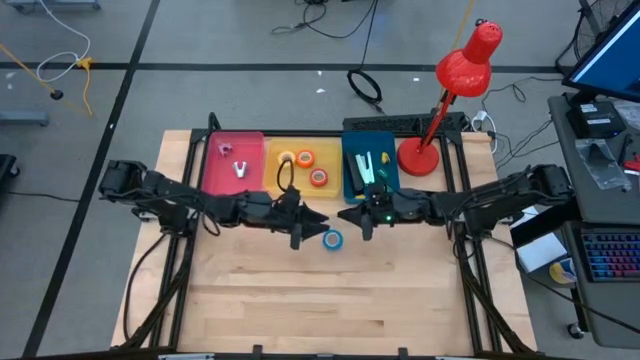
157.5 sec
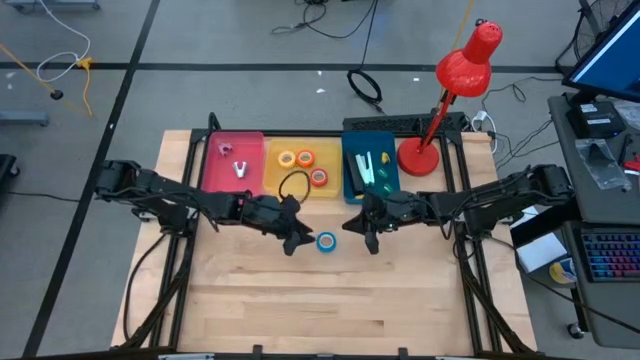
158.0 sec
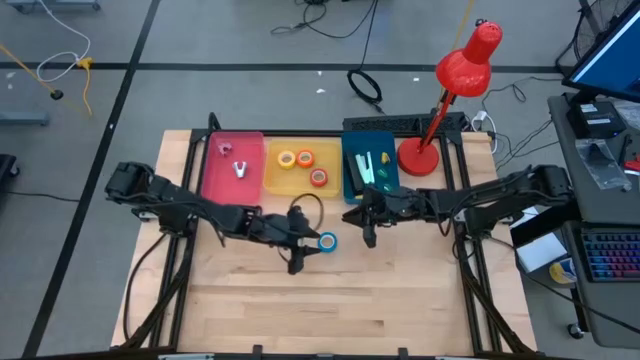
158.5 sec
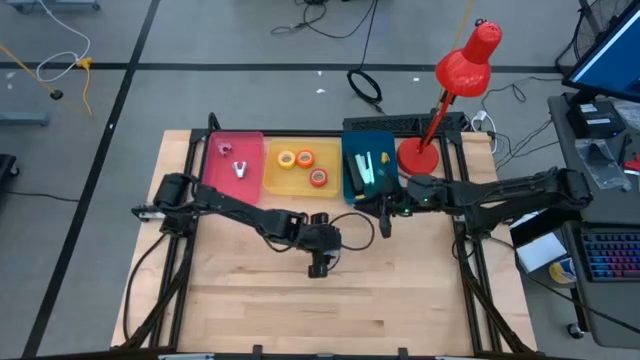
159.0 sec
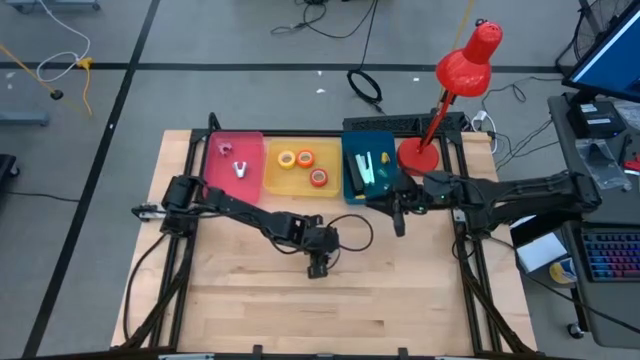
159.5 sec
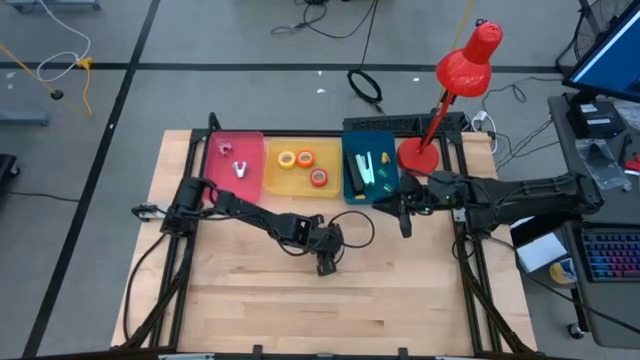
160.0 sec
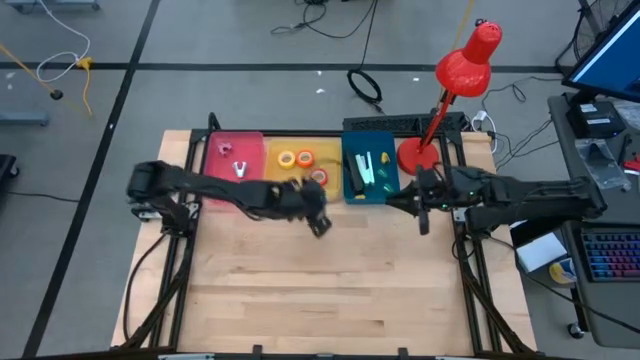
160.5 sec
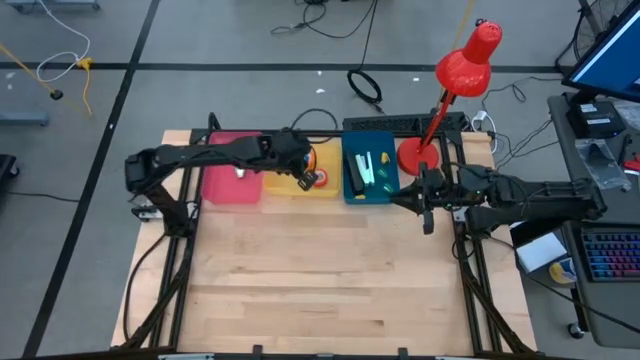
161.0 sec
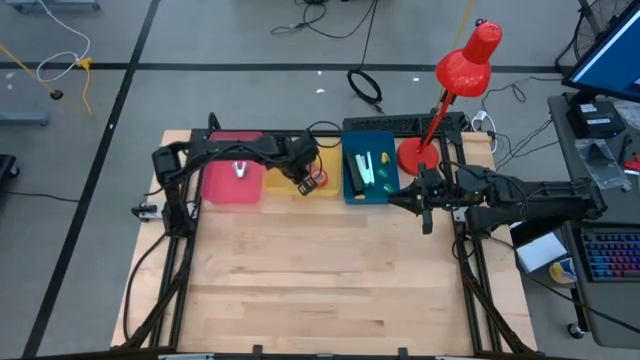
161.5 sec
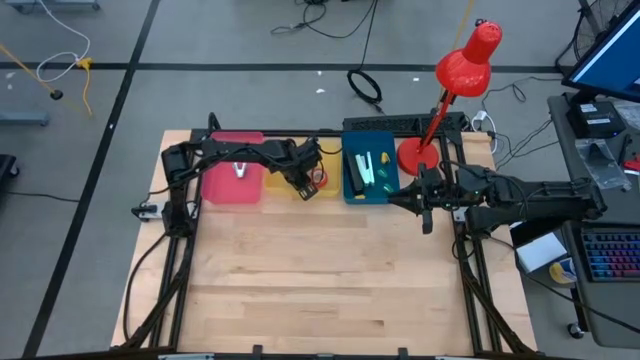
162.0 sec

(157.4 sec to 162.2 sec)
Task: Pick and place Stapler, Stapler remover, tape
Put the blue tape into the yellow bin

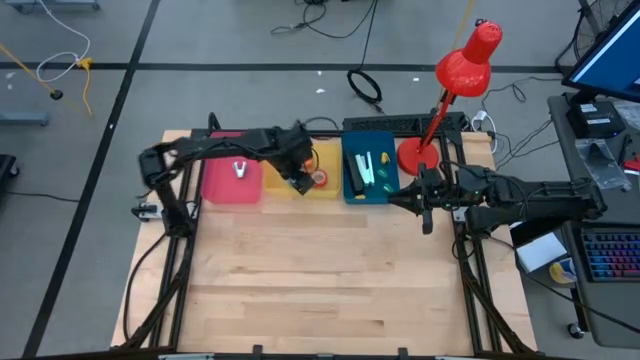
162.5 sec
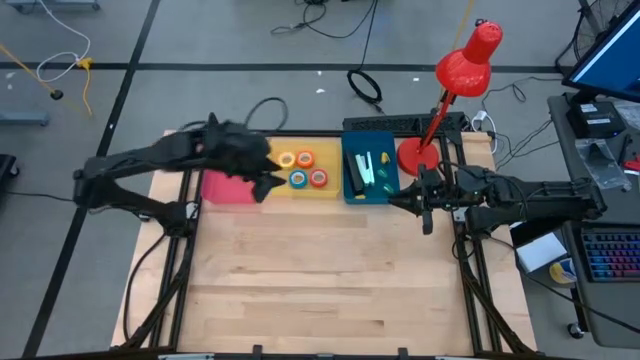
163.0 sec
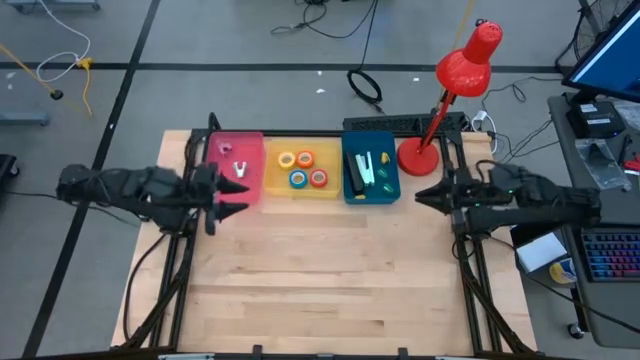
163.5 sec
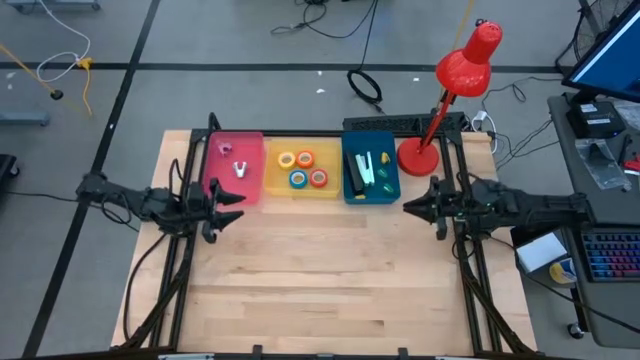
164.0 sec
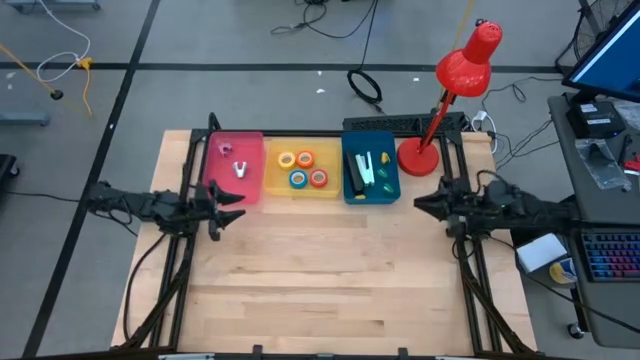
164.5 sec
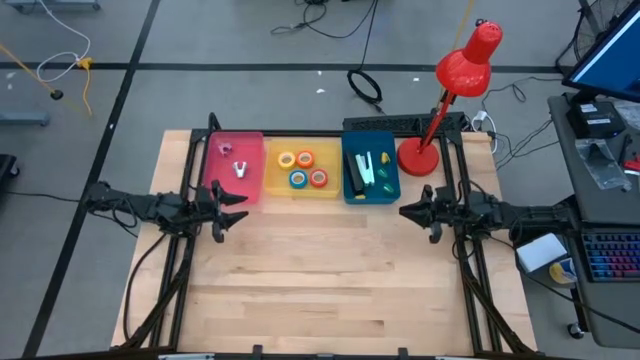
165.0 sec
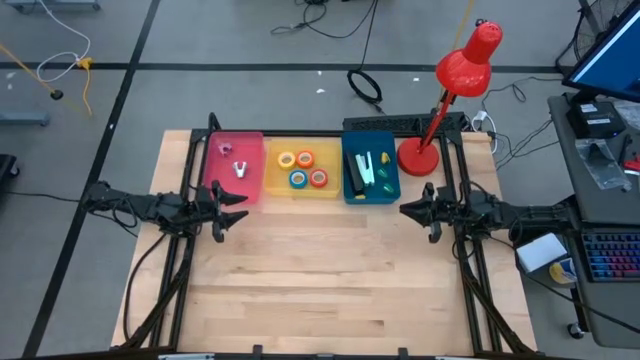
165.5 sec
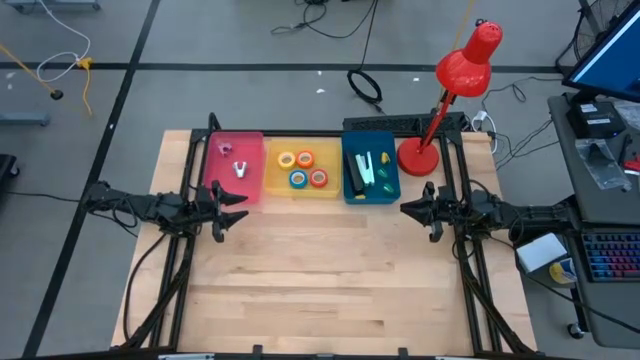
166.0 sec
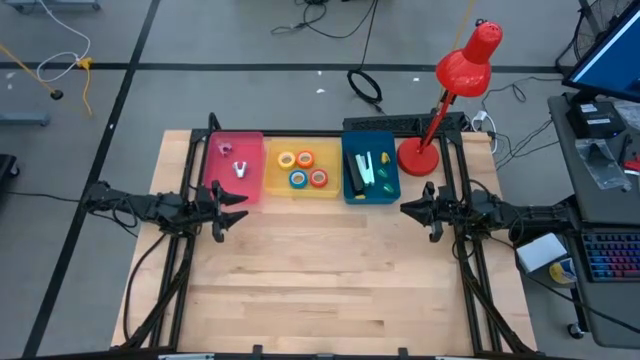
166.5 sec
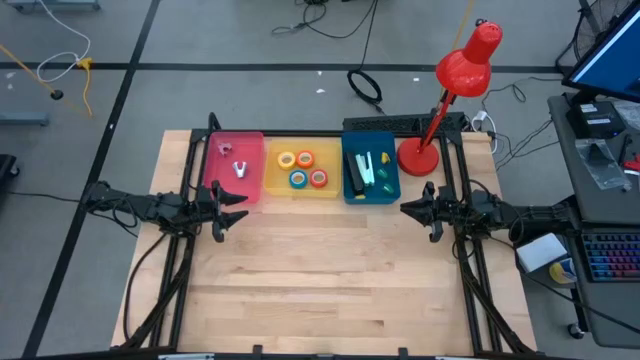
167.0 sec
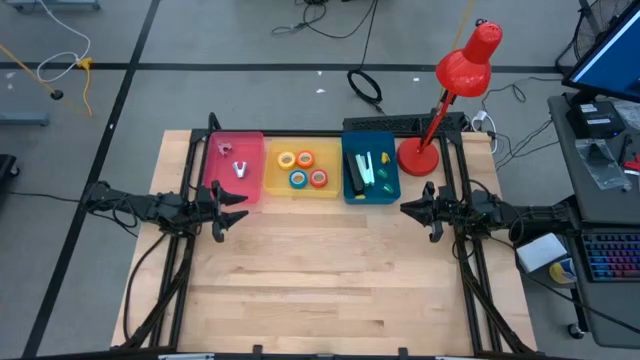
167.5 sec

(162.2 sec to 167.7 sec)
Return to Home Position

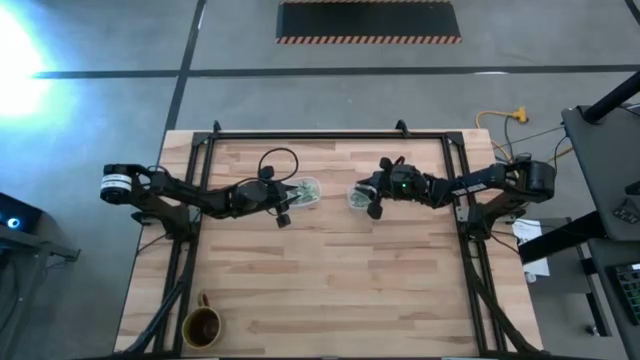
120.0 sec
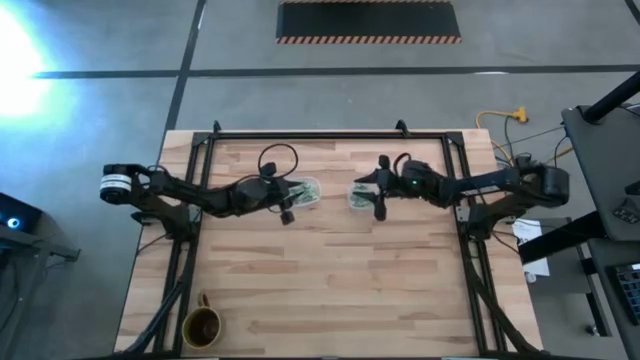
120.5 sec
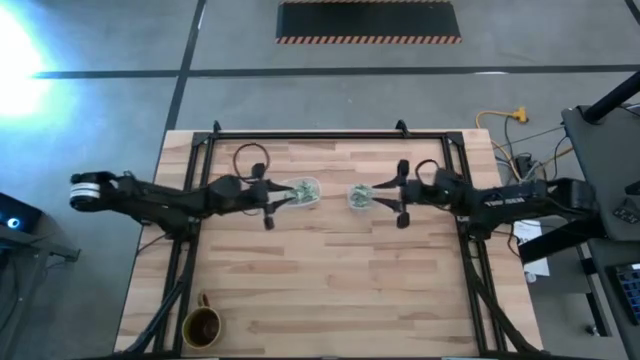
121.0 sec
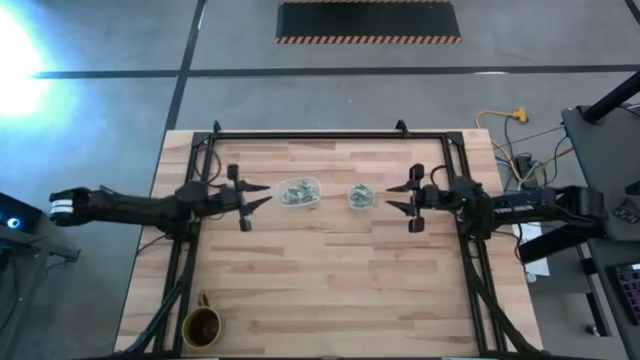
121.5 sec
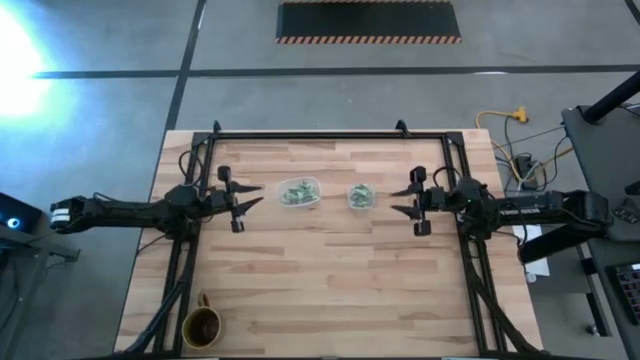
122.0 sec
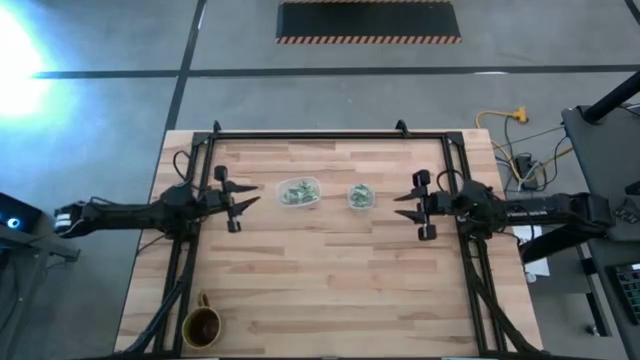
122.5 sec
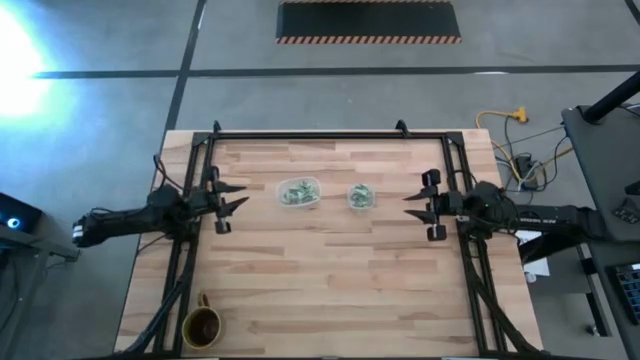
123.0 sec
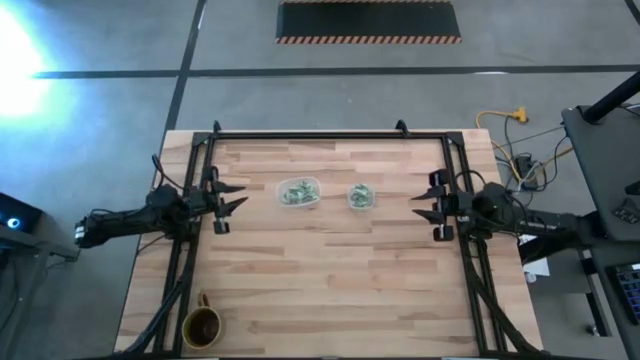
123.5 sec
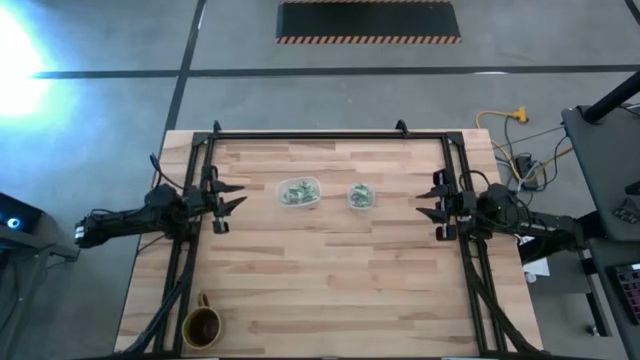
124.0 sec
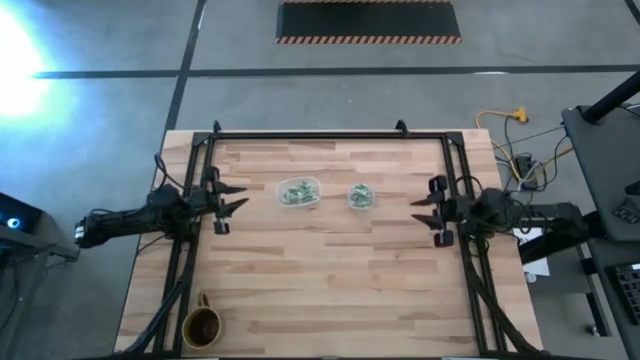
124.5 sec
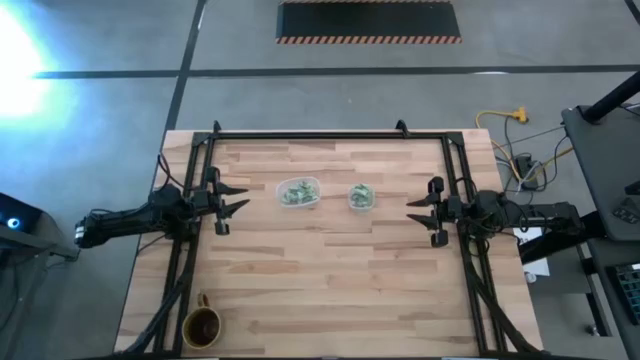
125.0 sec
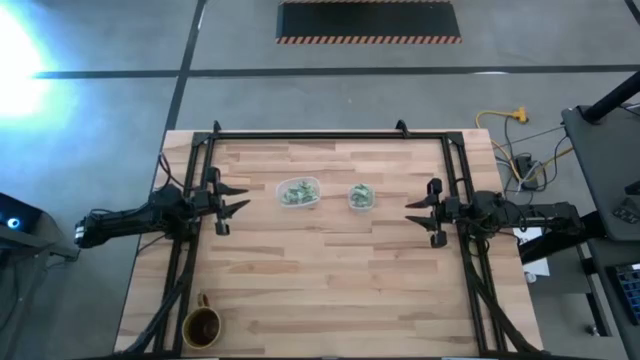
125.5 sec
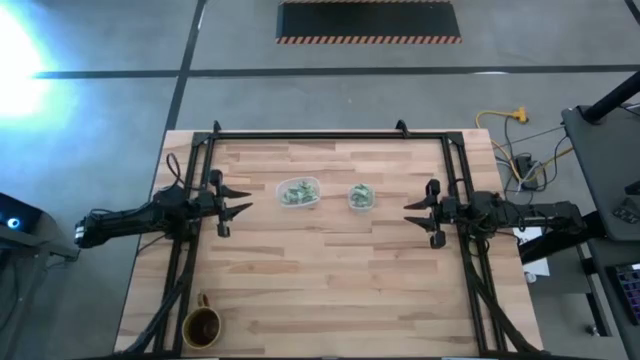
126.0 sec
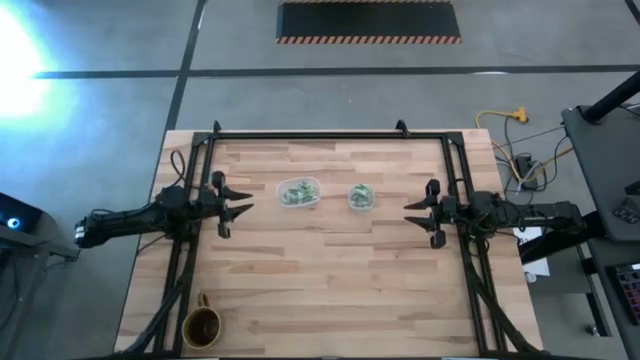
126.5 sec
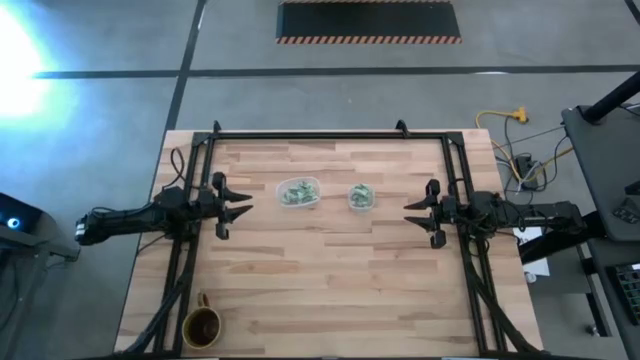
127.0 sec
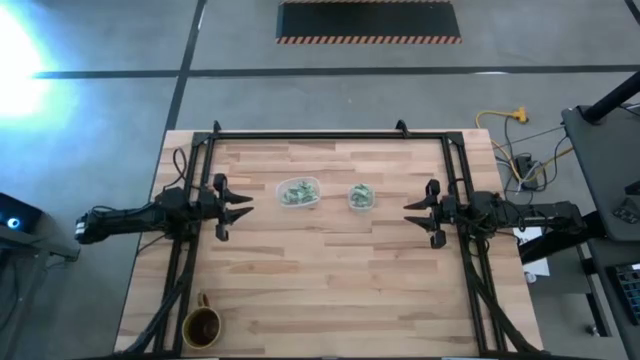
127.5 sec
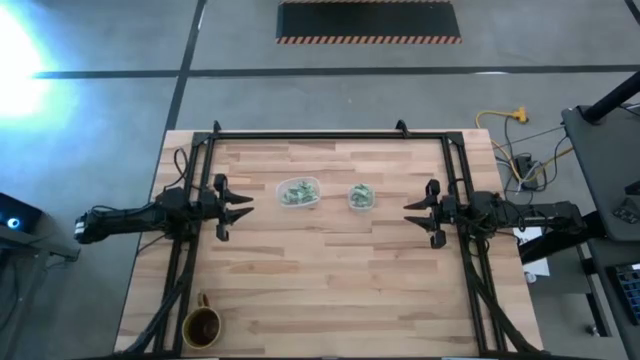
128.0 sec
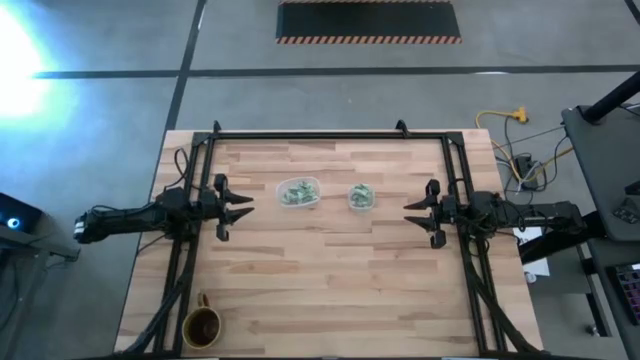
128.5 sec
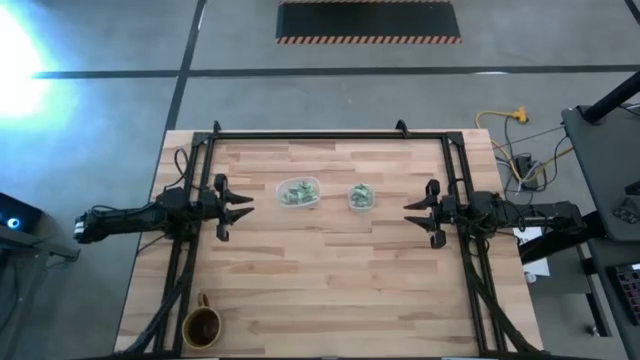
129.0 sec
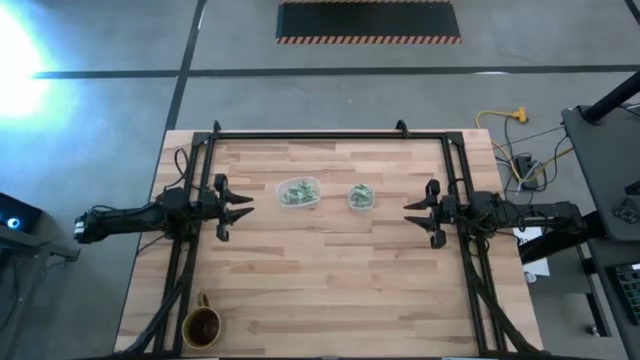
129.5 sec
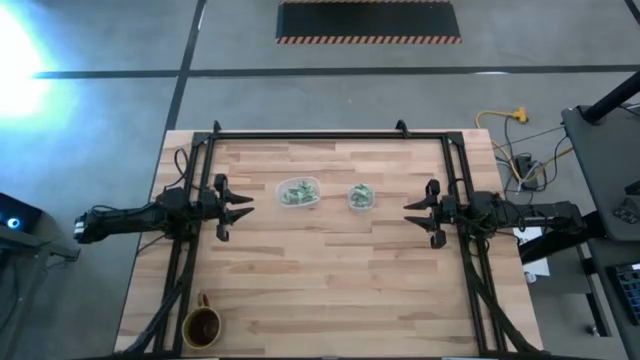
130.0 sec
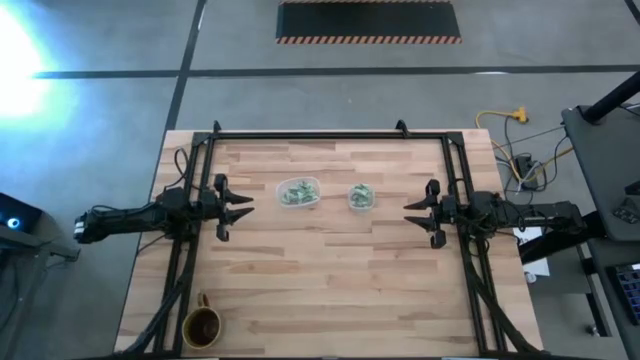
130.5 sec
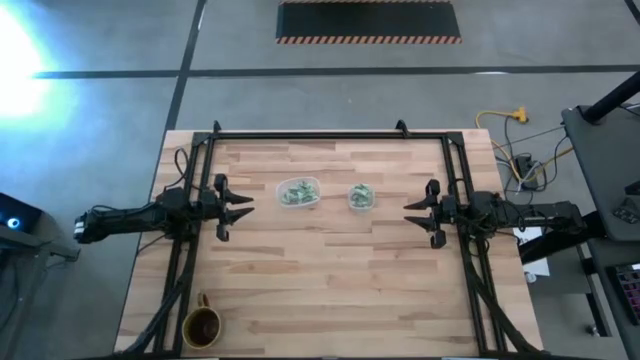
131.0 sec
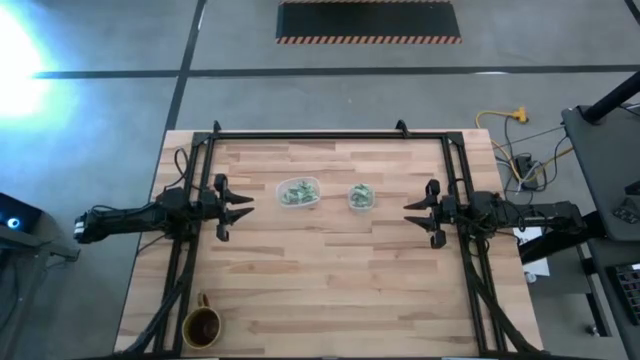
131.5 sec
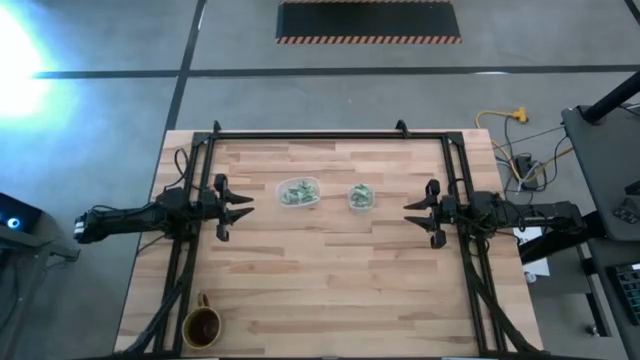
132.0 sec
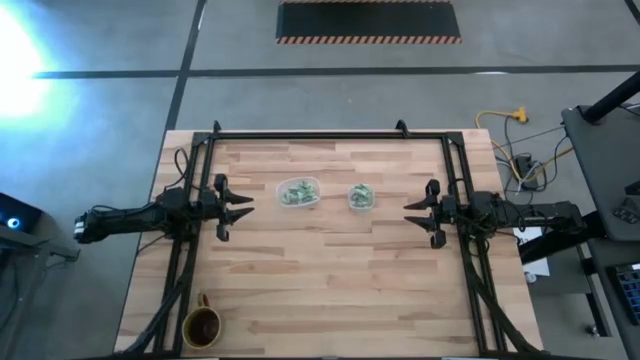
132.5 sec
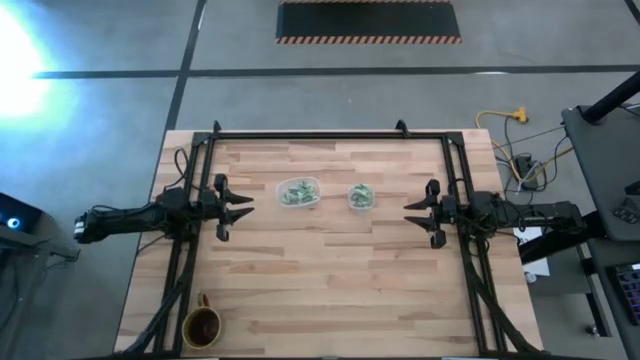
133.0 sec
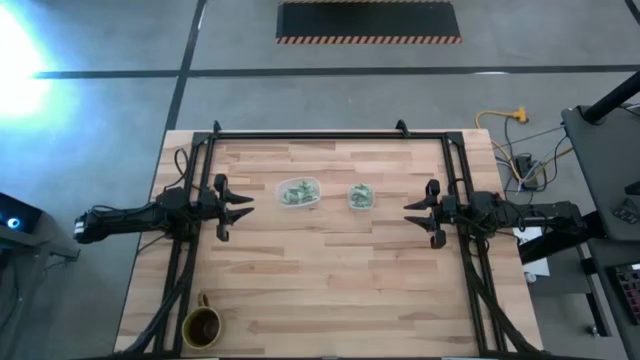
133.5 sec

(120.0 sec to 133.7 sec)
Task: Pick and place Stevia / Truvia into bins
Return to Home Position
